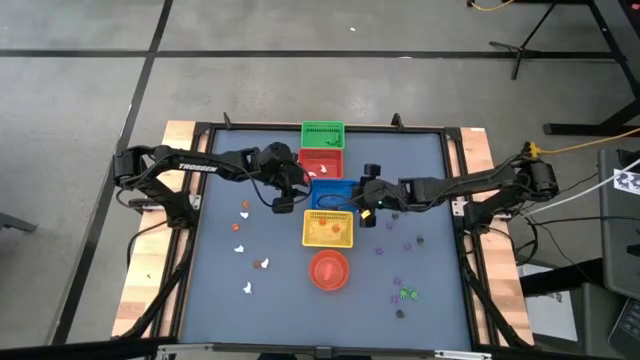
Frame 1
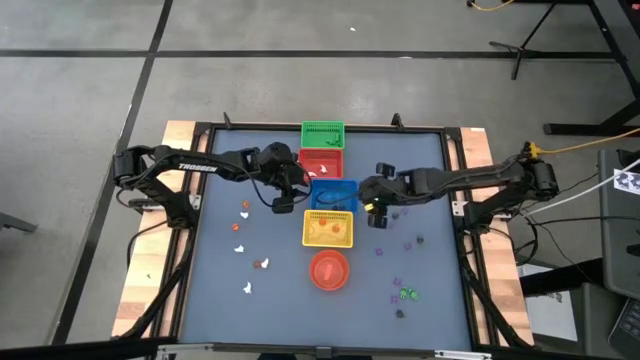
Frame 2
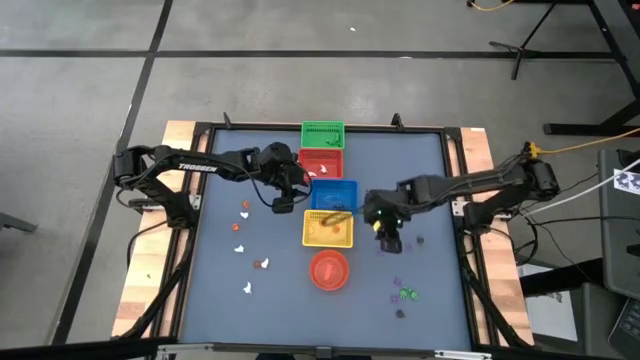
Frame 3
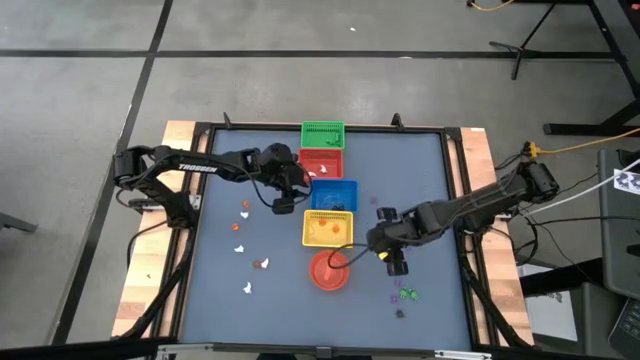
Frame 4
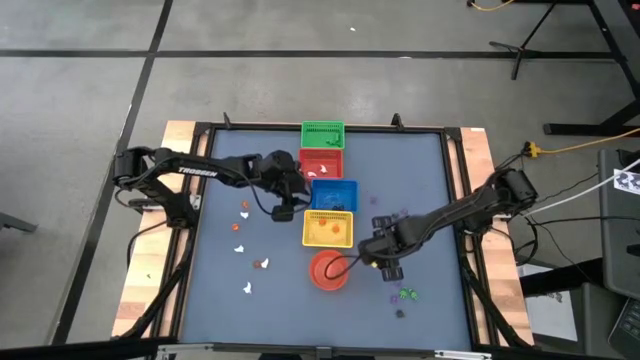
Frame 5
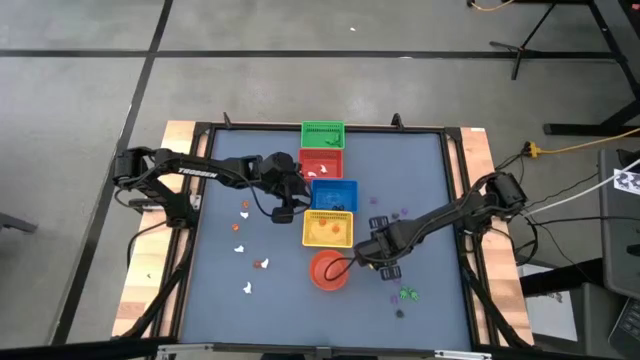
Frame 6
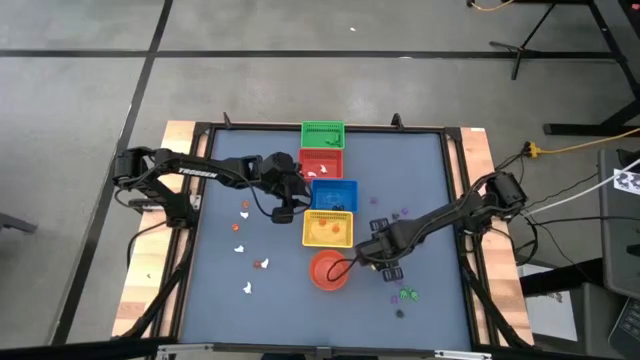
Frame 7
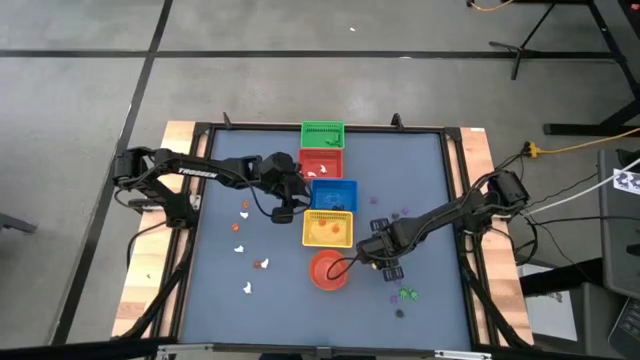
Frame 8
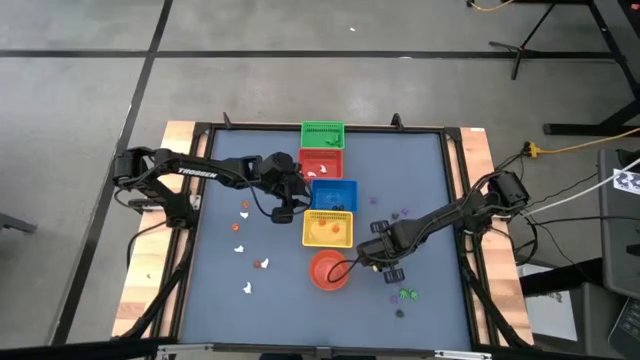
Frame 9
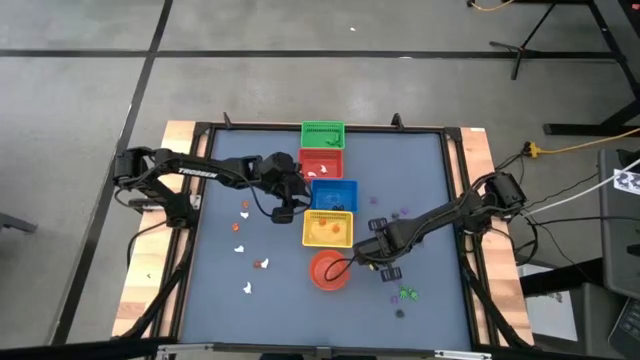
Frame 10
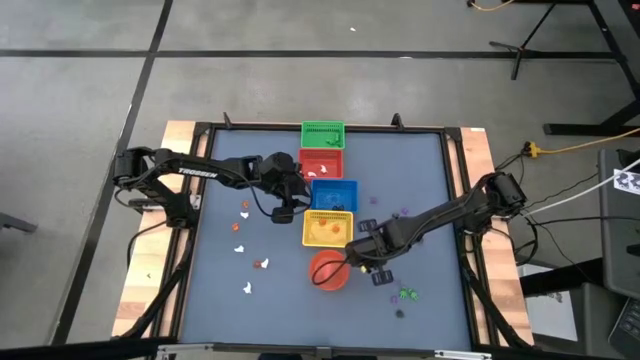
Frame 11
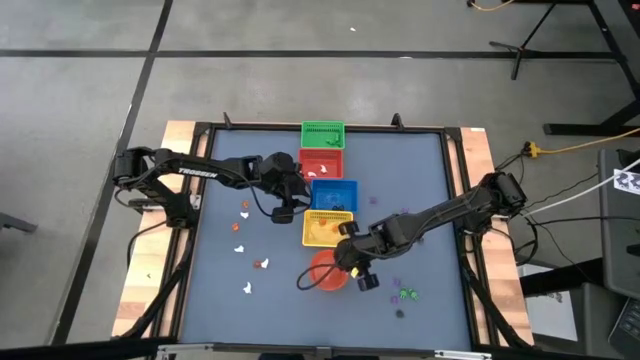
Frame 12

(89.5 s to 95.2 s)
Task: Sort Halloween decoration
Put the purple spider toy into the orange bin

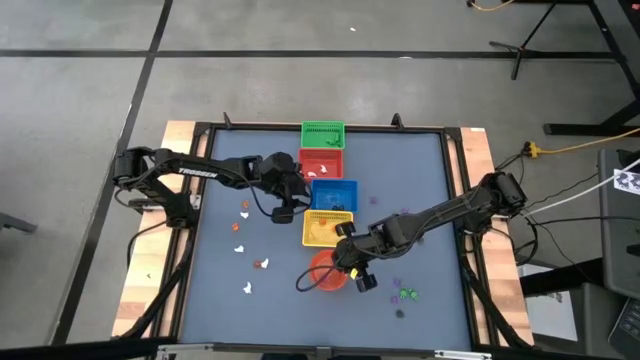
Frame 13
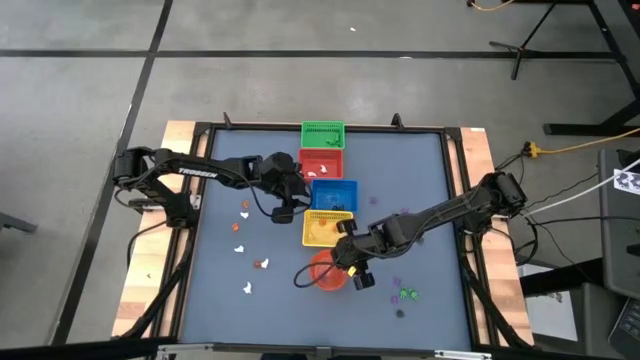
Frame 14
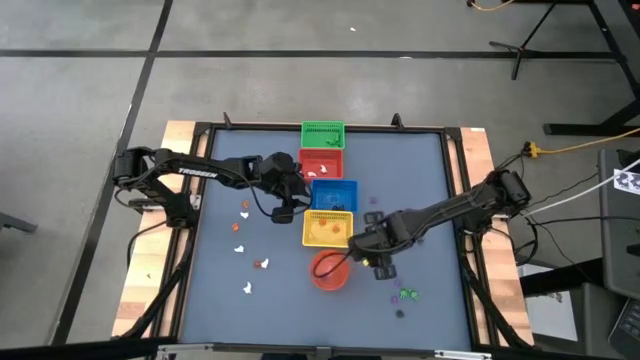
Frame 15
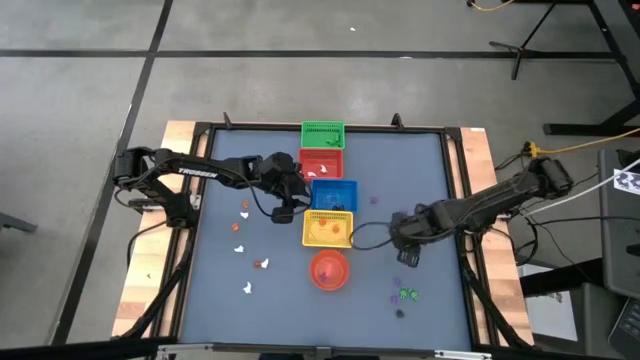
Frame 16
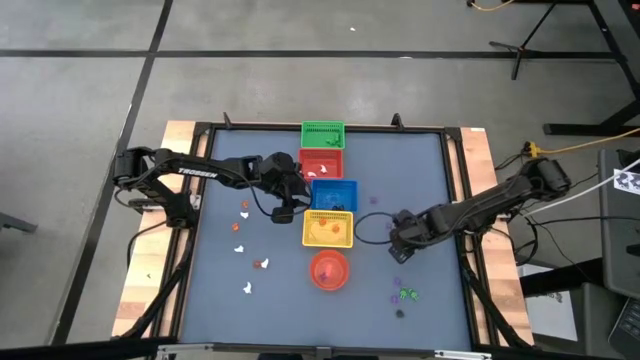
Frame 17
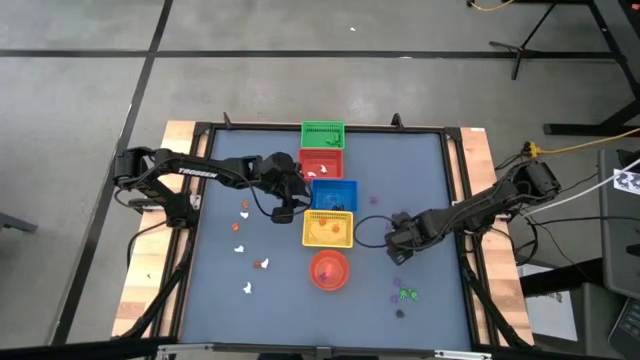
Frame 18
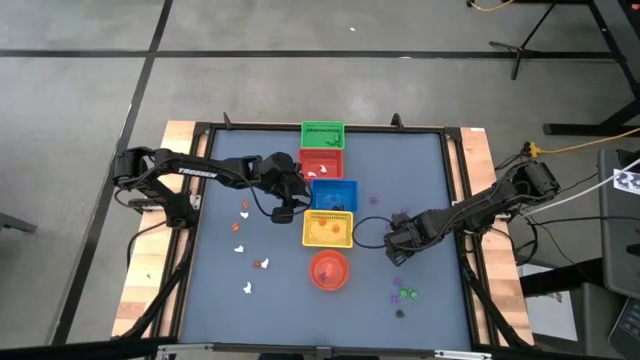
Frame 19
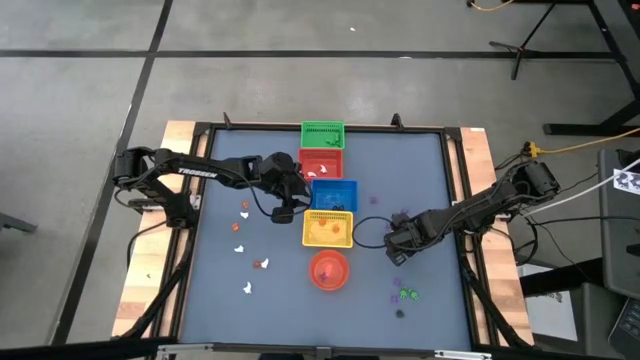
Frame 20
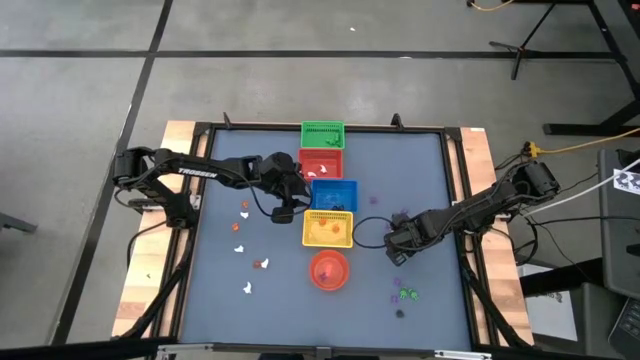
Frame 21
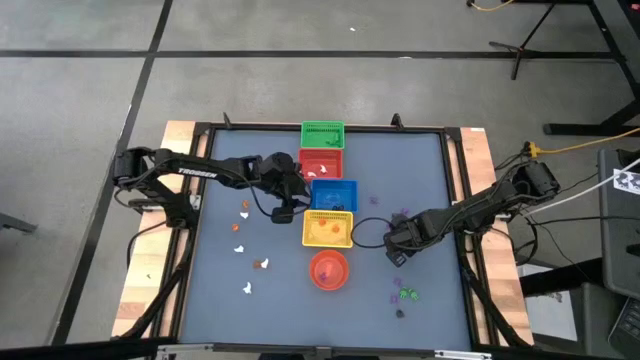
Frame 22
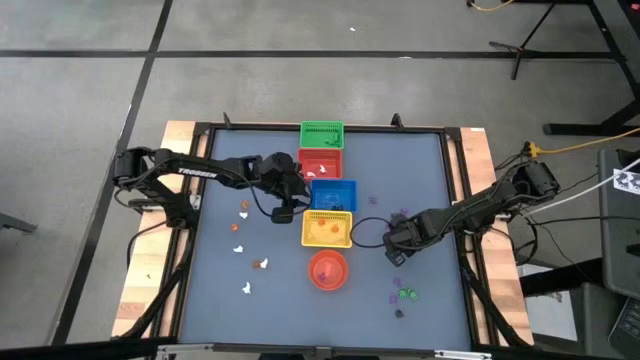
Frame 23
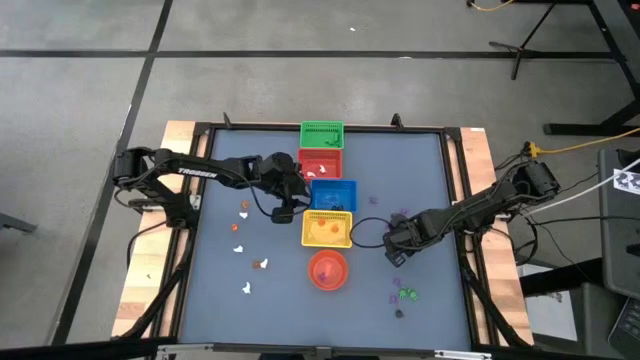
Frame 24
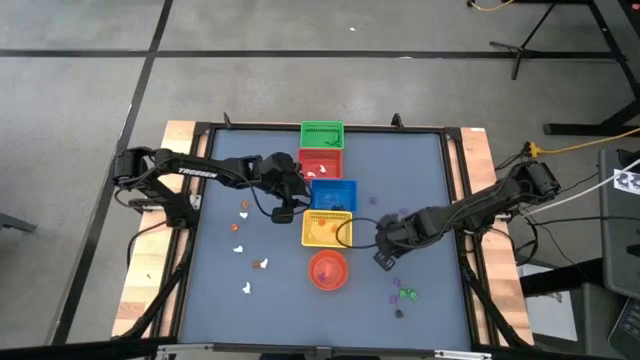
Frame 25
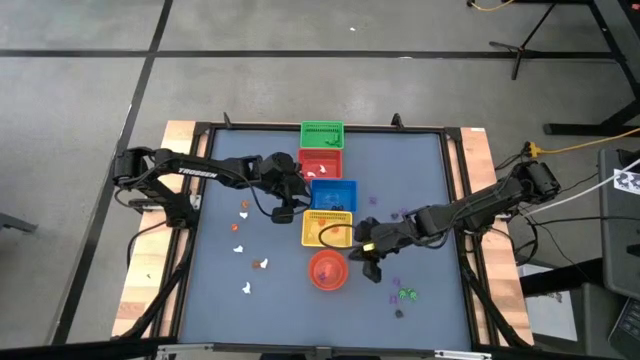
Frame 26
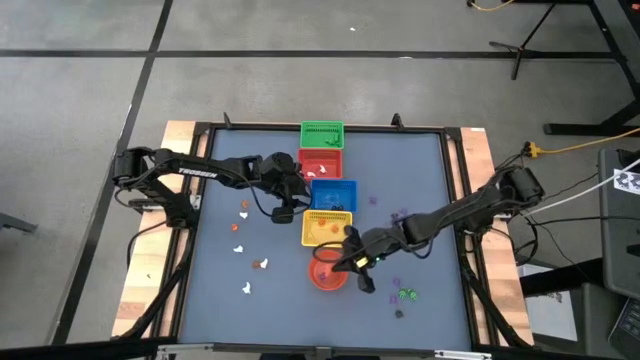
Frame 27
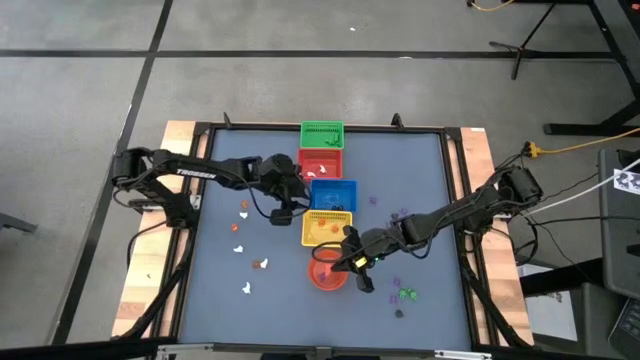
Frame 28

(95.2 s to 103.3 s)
Put the purple spider toy into the orange bin

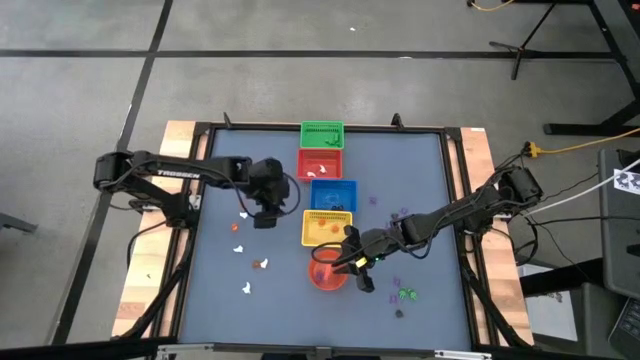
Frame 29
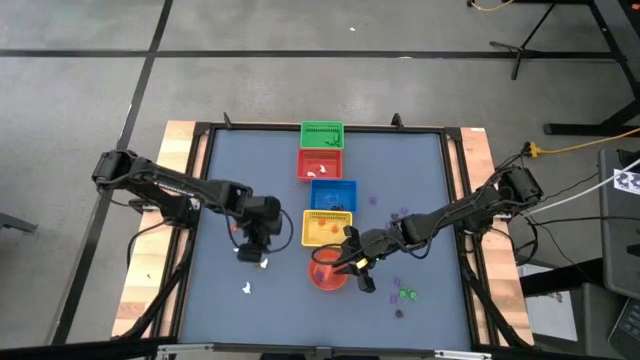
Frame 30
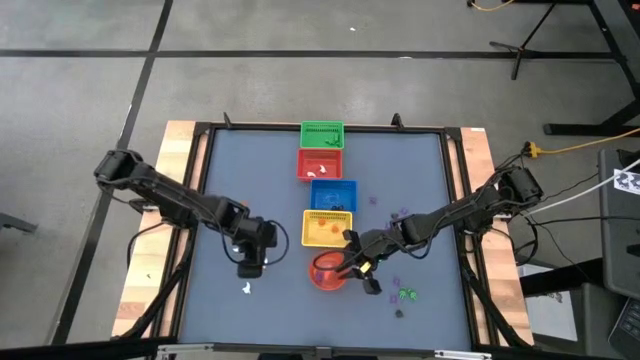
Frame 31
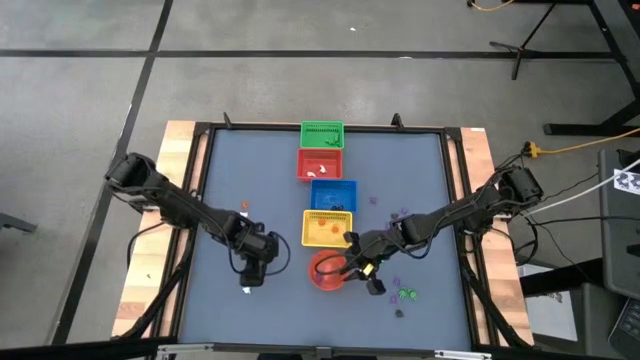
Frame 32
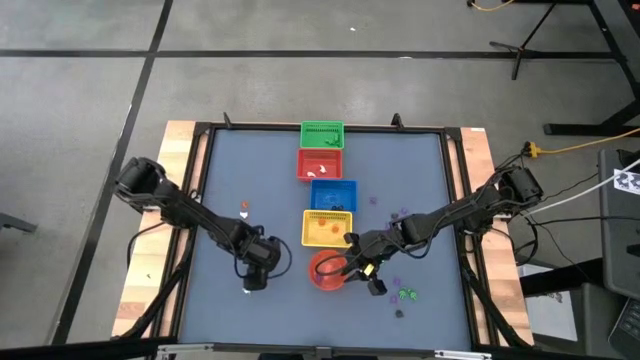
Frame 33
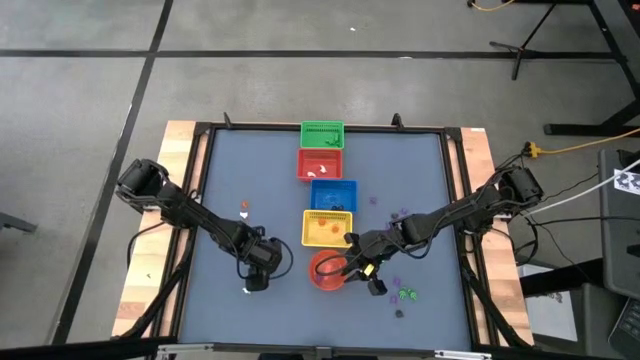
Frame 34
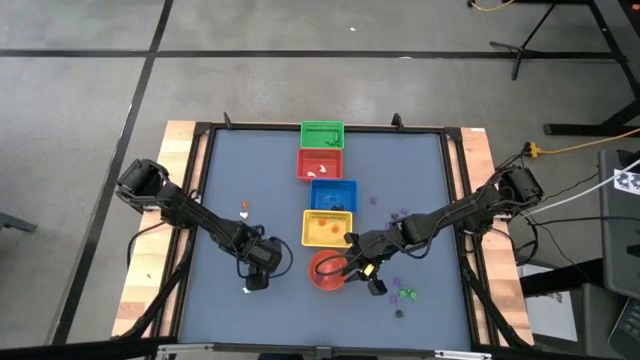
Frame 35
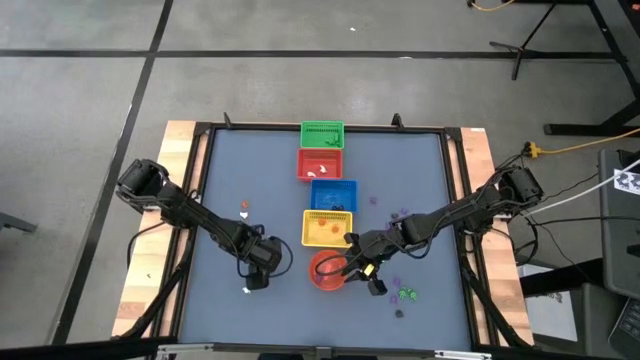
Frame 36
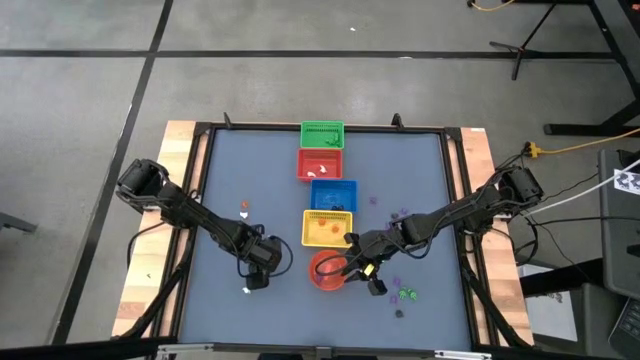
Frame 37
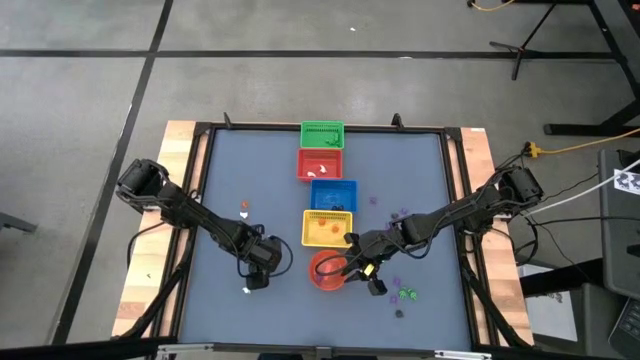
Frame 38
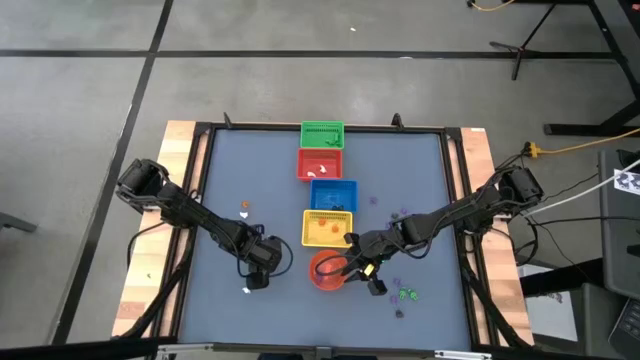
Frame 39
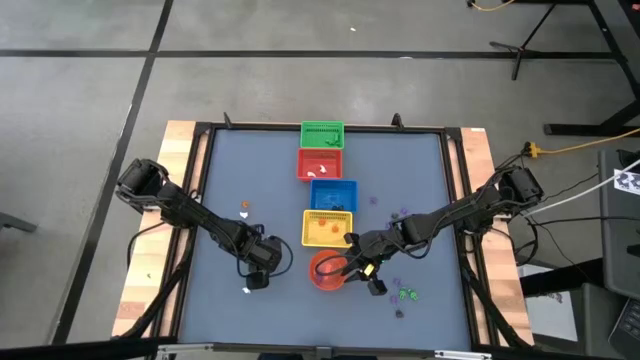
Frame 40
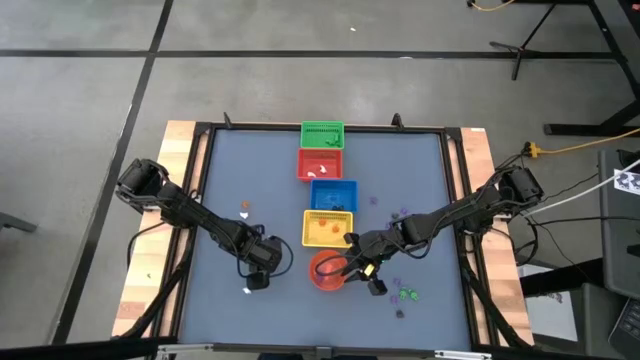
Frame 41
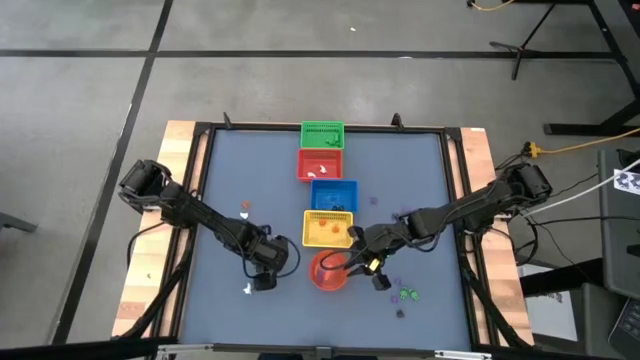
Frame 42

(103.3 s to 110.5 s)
Put the white ghost toy into the red bin
